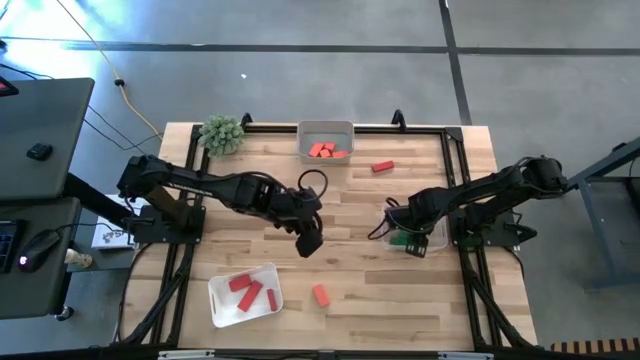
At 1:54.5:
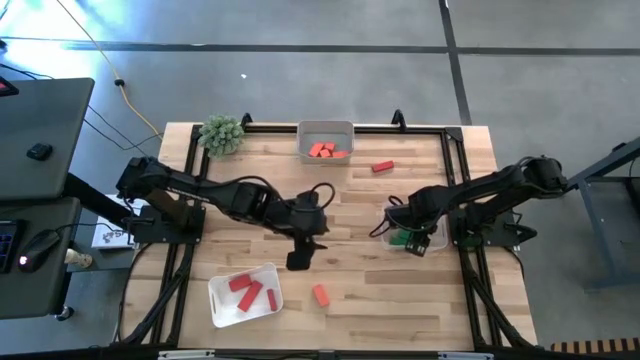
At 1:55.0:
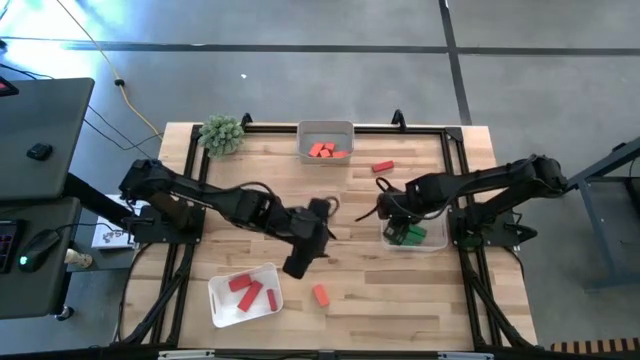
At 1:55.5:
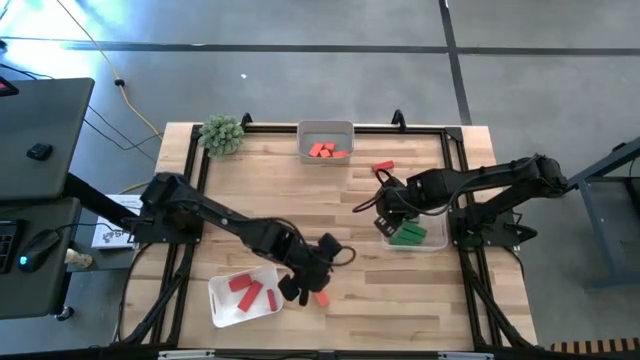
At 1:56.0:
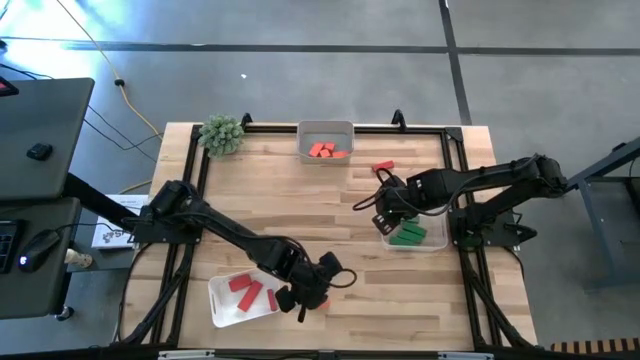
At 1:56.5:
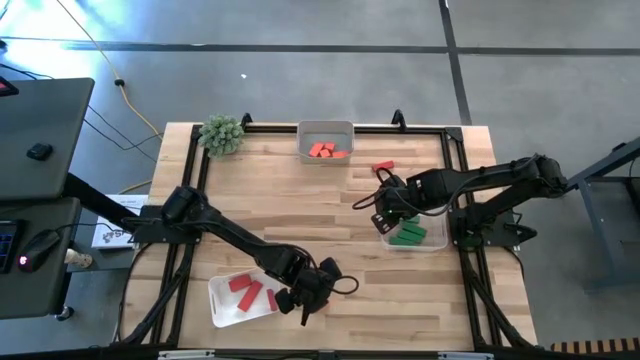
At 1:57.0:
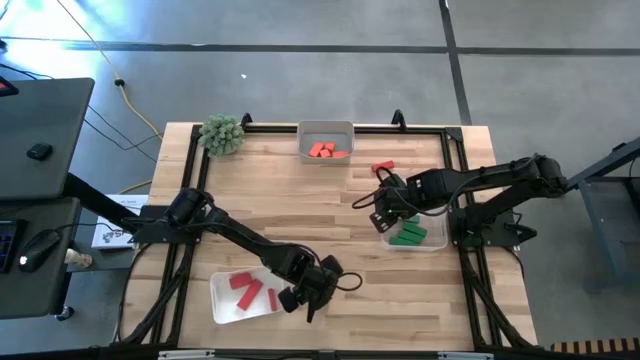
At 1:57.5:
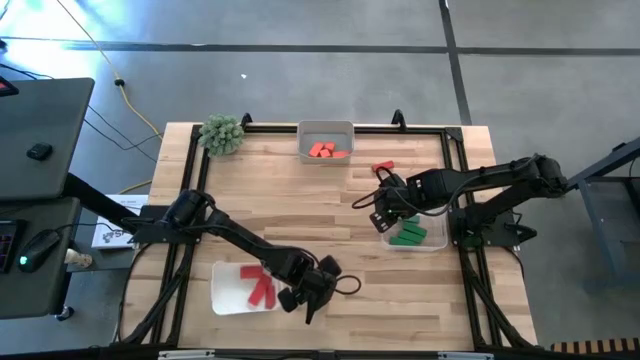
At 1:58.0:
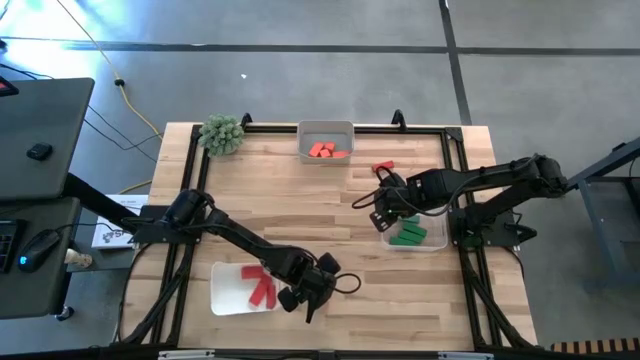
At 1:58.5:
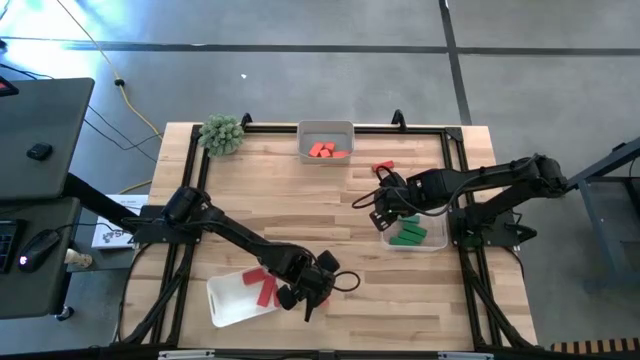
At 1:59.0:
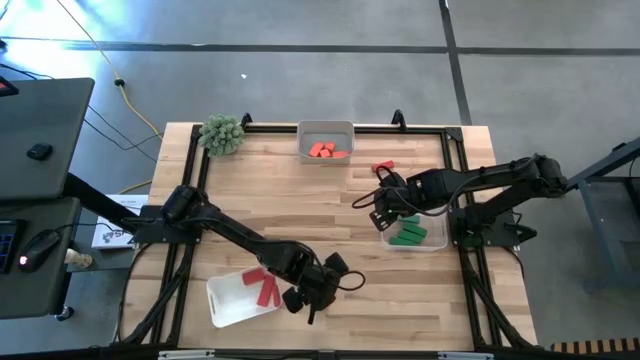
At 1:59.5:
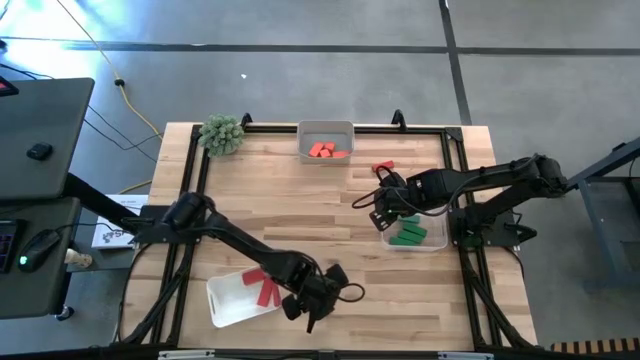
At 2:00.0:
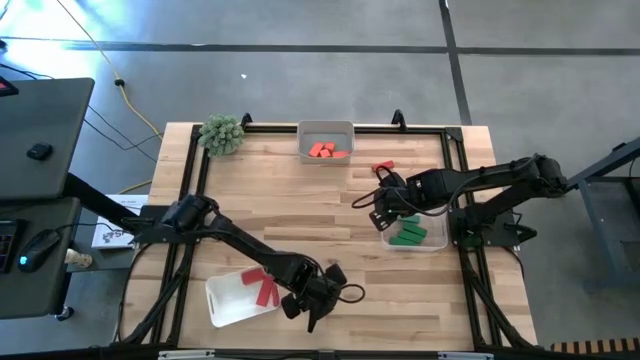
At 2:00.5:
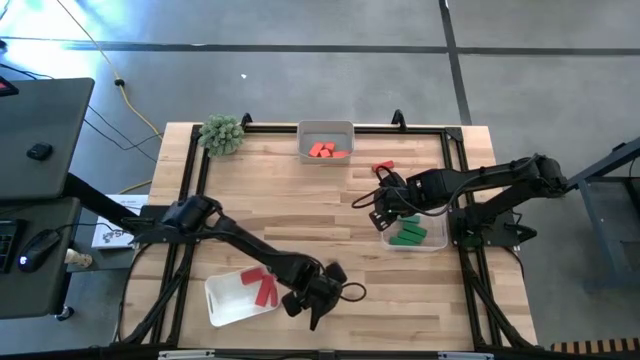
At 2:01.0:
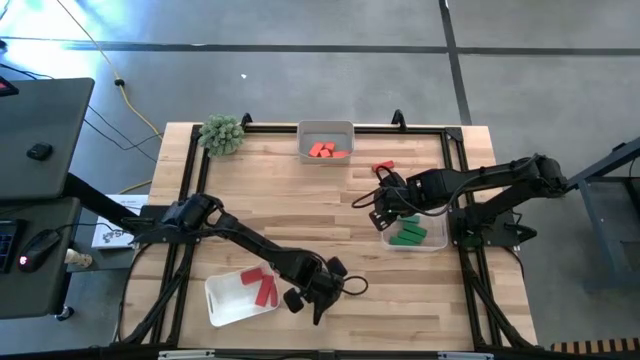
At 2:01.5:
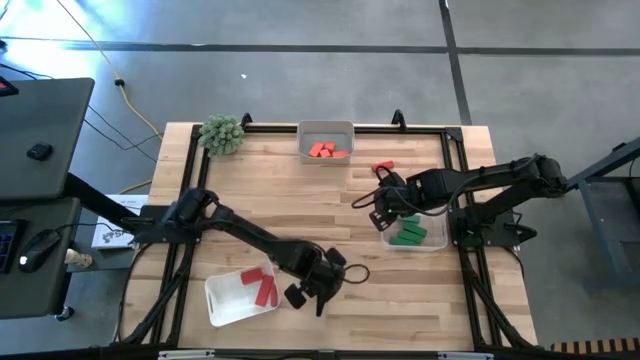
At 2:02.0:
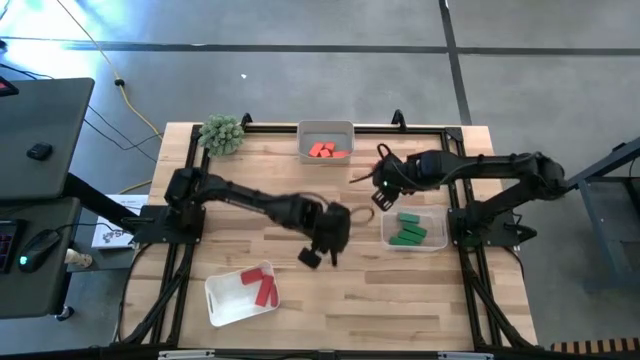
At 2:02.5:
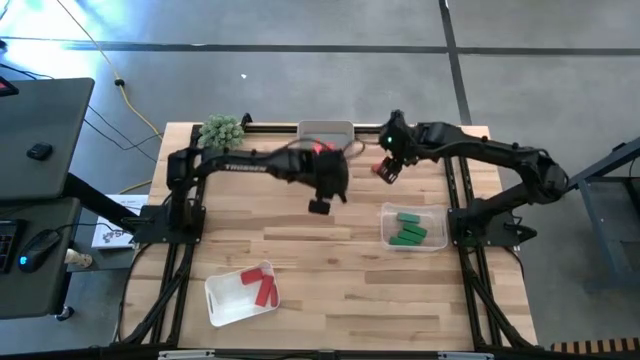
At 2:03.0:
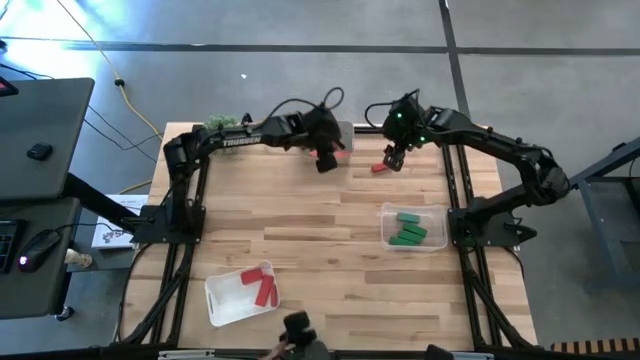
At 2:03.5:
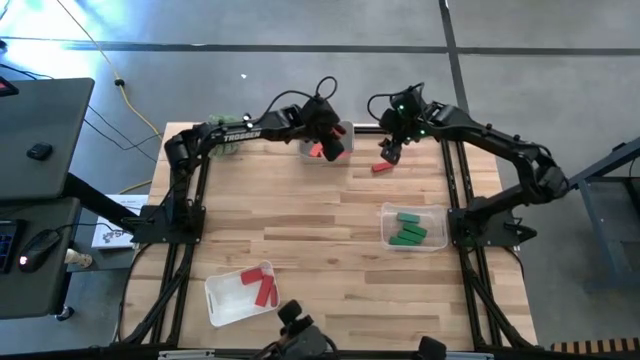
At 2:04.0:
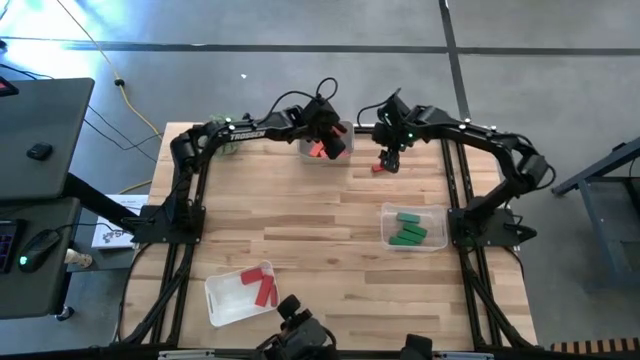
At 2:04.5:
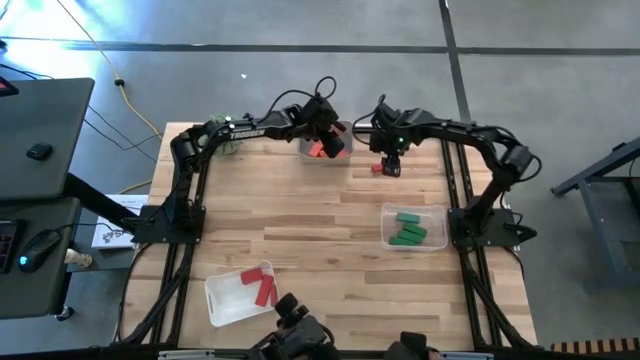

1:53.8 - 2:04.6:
Task: Sort & place blocks by color
Put the orange wooden block into the gray bin

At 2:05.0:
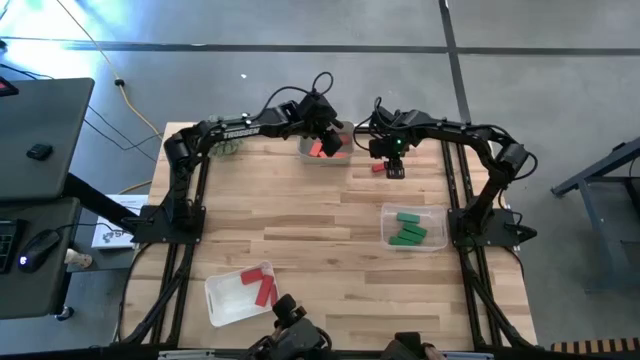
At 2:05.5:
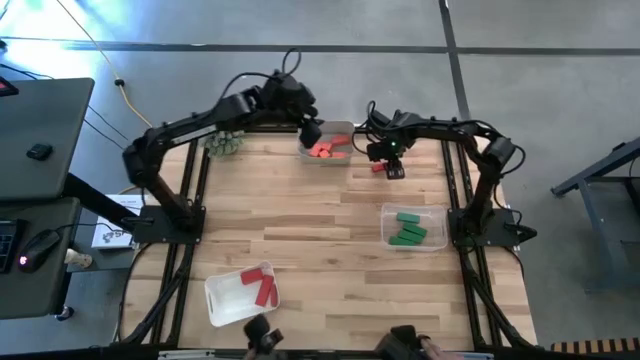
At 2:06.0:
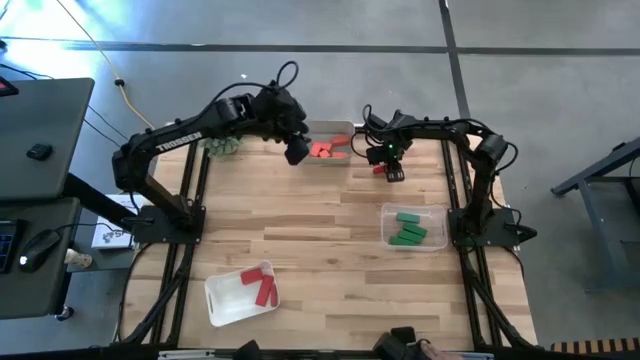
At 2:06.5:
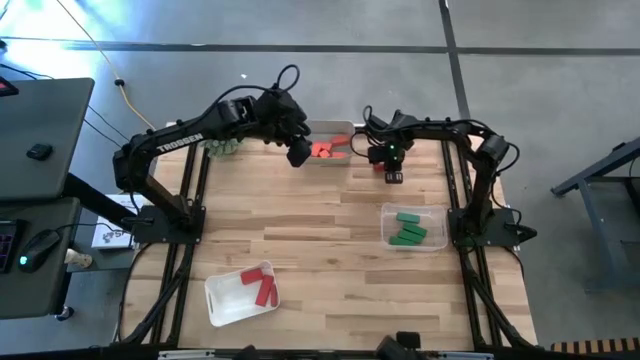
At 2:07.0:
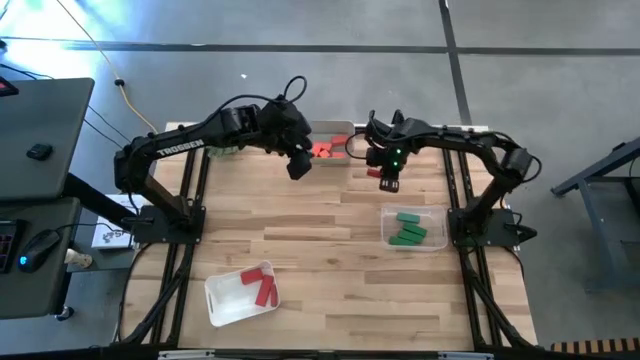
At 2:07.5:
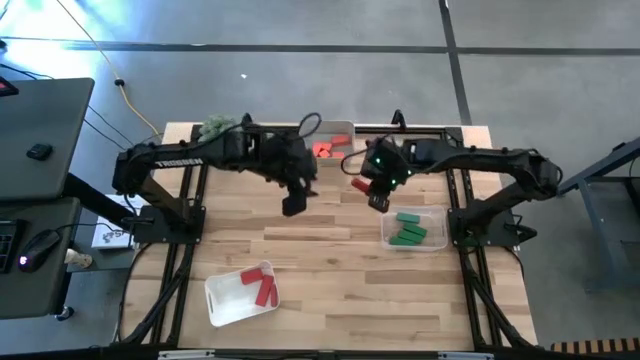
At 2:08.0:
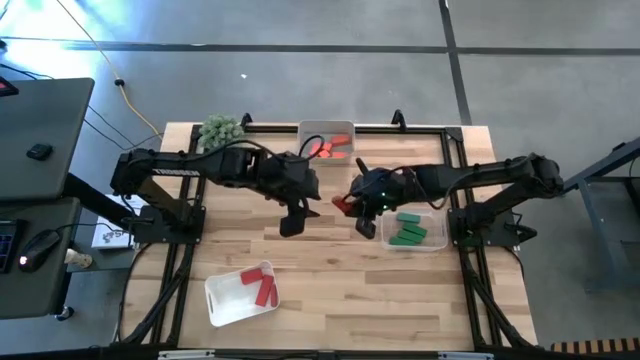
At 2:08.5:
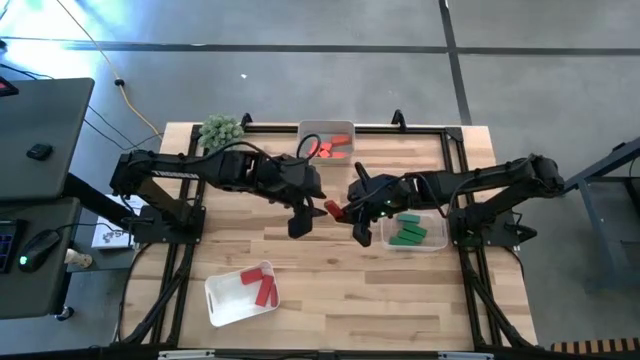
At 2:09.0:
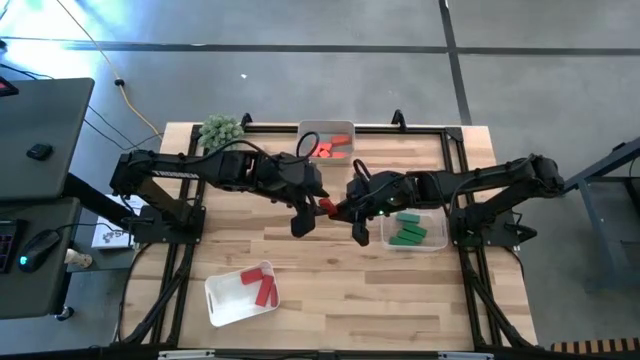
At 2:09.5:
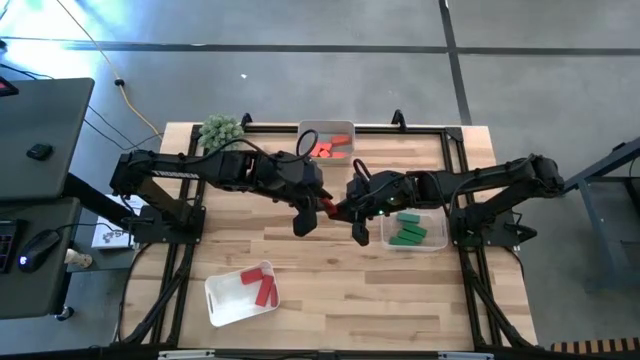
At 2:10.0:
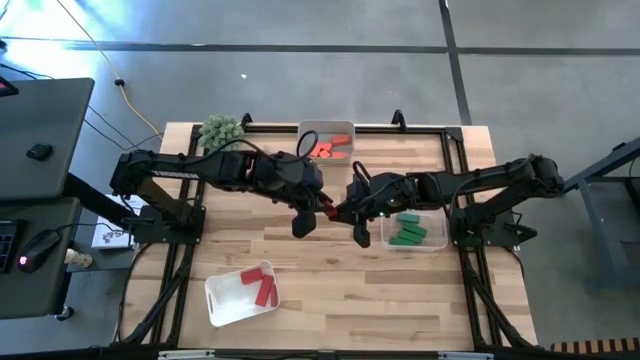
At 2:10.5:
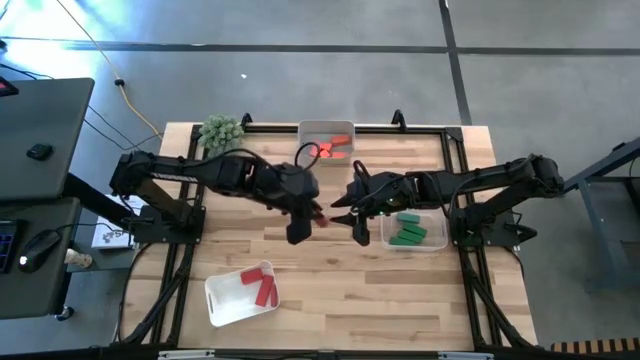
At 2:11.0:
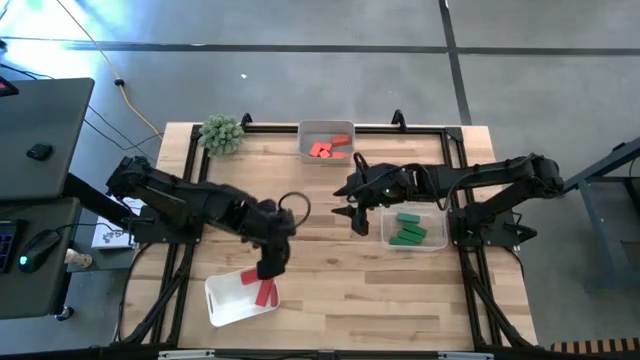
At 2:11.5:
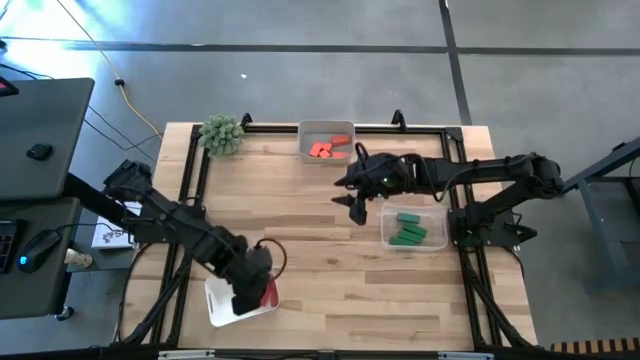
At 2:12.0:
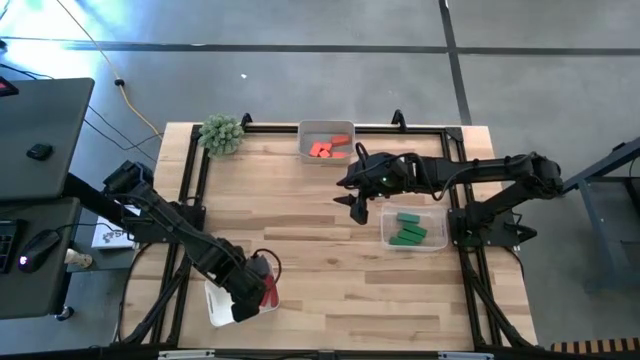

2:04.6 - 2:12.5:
Put the red wooden block into the white bin

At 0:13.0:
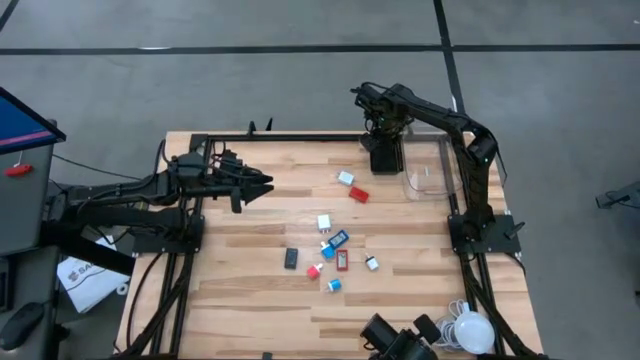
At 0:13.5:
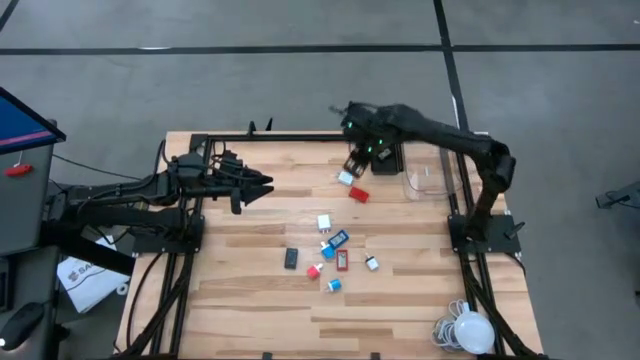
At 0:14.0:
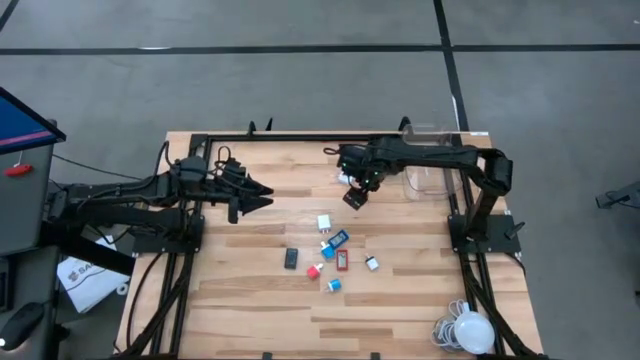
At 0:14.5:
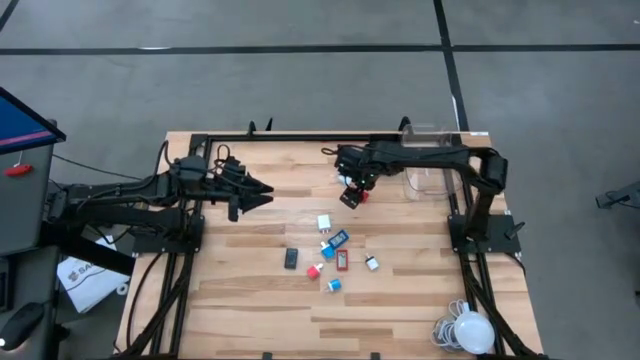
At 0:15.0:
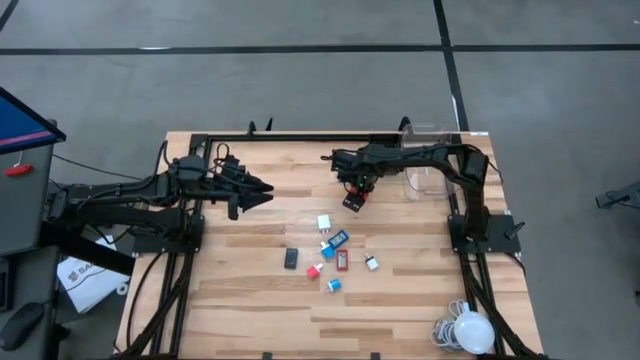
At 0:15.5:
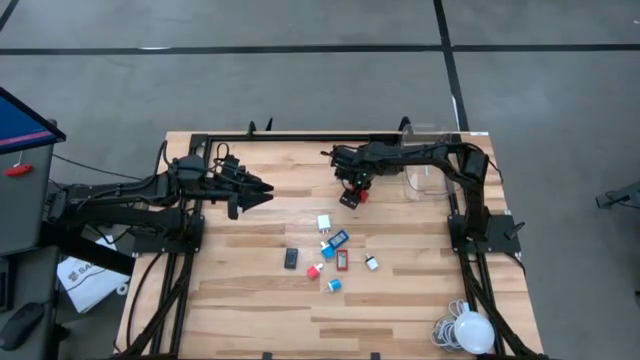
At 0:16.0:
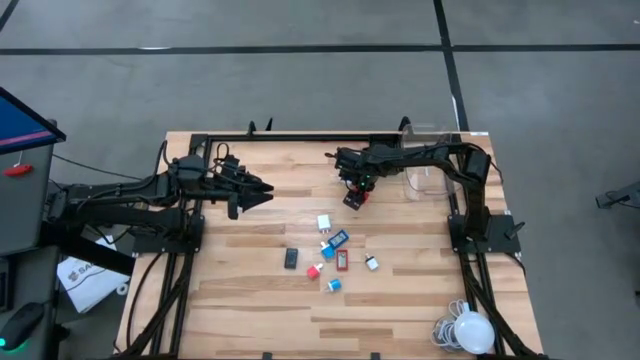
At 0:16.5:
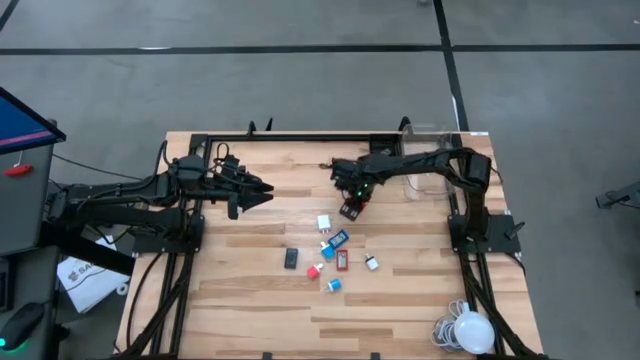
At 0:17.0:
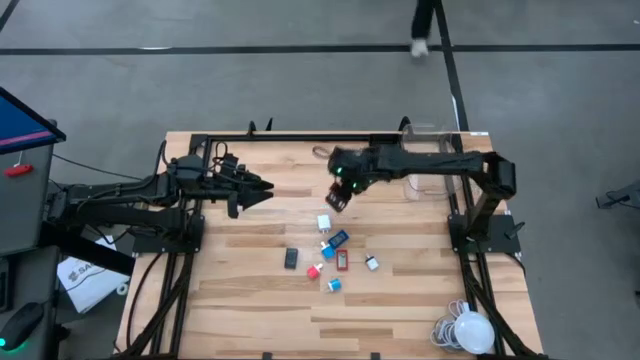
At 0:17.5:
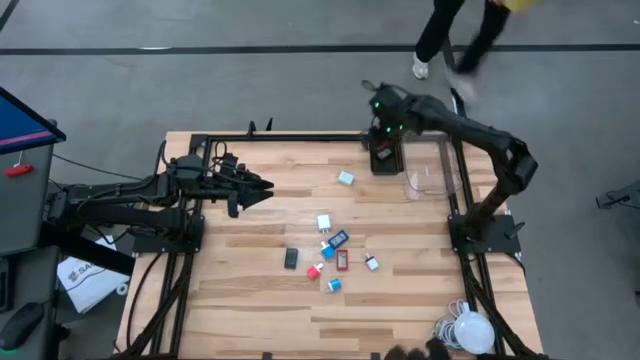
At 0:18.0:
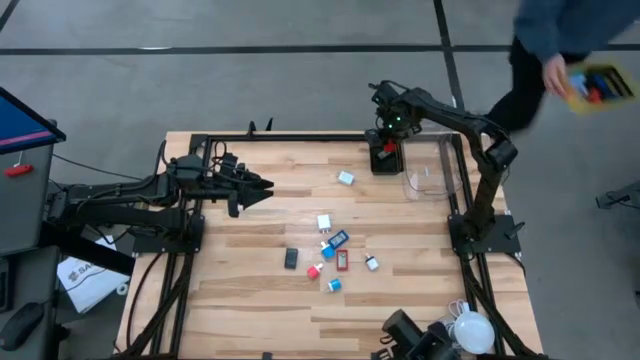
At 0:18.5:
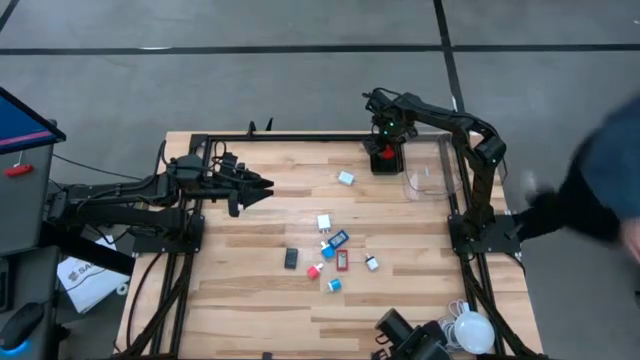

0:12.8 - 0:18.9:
Task: Pick & Place Office items
Put the top red digital timer into the black bin
